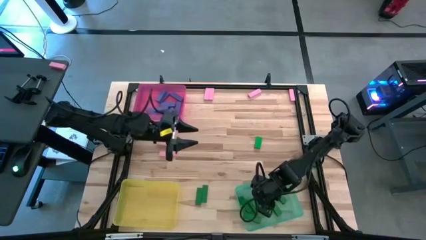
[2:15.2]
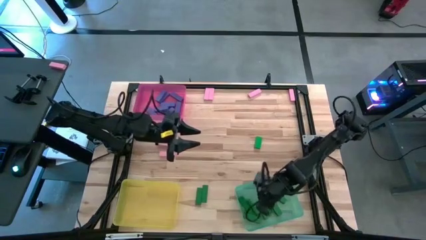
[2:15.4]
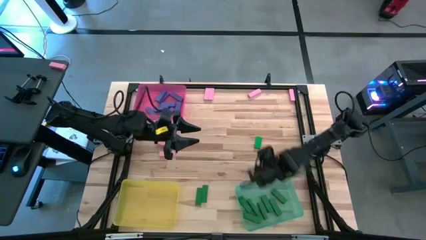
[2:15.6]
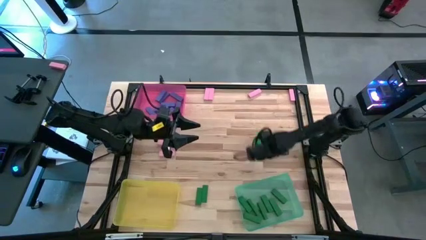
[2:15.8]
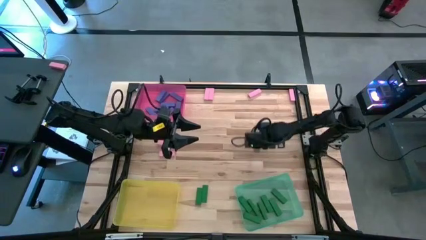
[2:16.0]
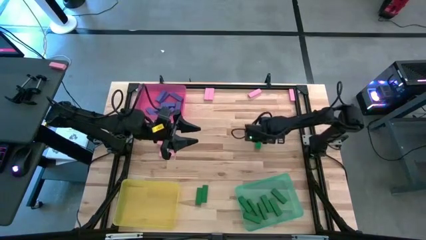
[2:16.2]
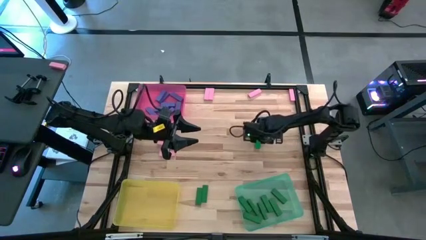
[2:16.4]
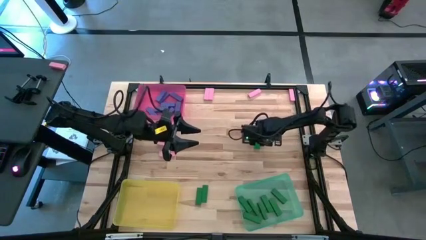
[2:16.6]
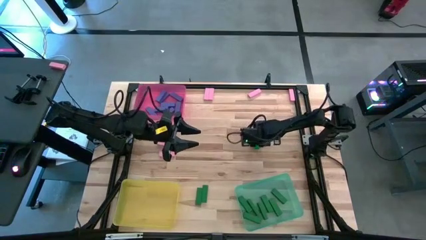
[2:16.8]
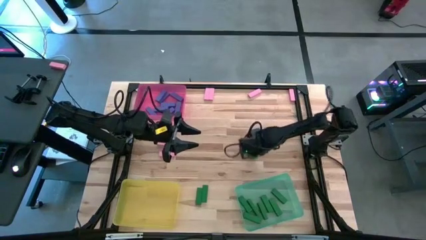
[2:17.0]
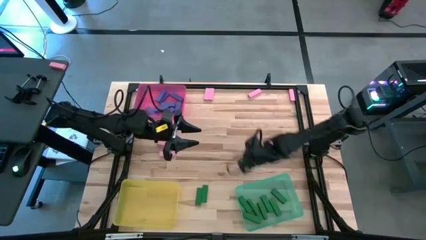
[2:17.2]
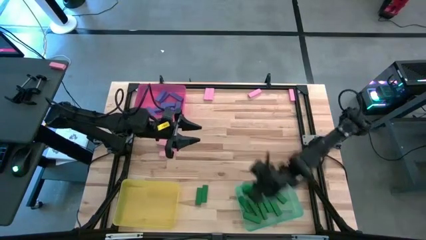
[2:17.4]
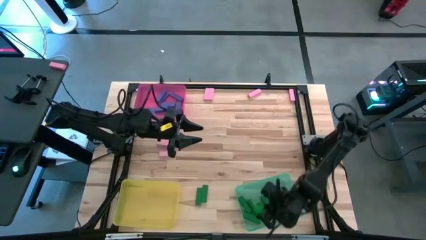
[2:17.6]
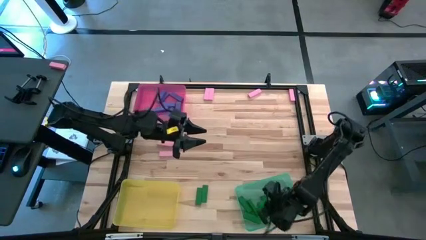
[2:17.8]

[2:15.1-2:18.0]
Task: Sort blocks
Put the green block into the light green bin

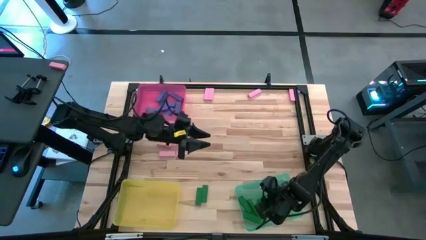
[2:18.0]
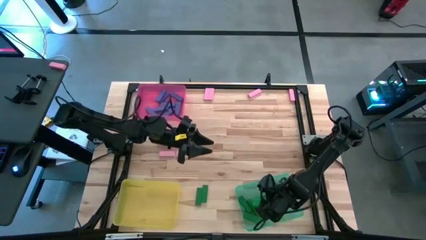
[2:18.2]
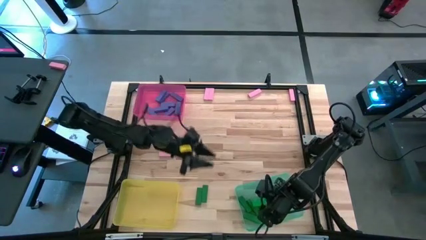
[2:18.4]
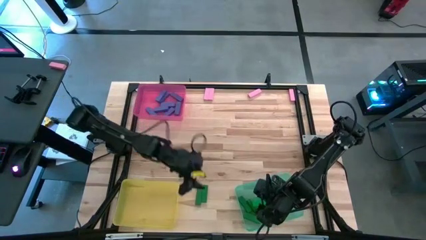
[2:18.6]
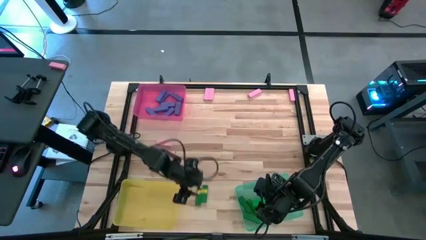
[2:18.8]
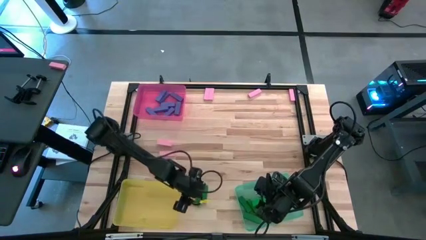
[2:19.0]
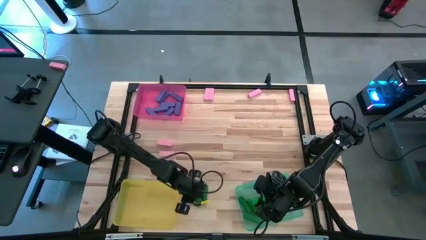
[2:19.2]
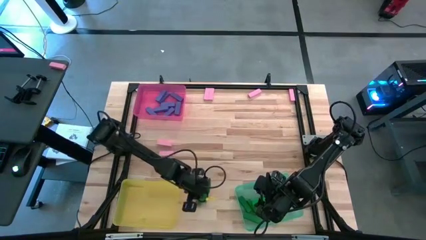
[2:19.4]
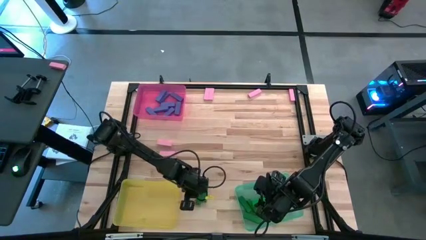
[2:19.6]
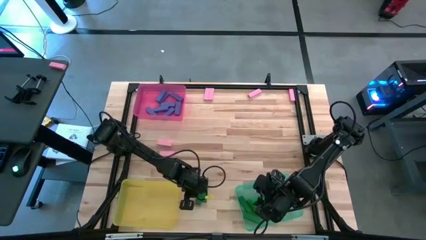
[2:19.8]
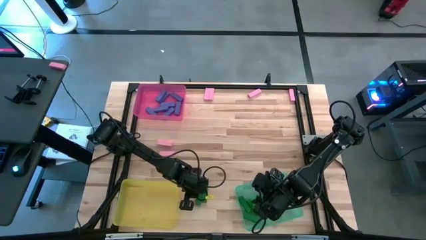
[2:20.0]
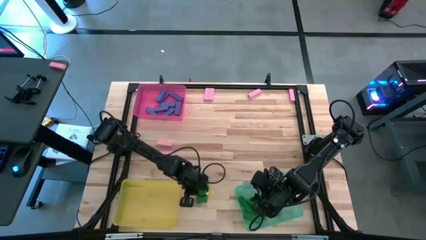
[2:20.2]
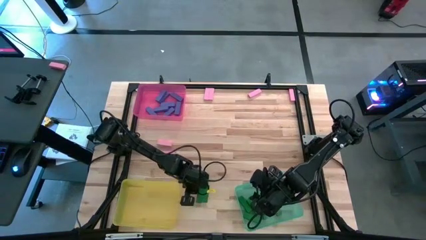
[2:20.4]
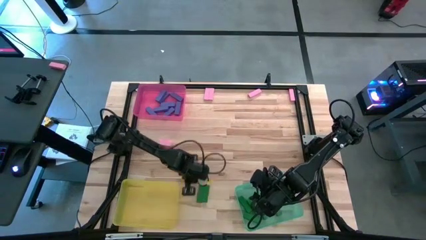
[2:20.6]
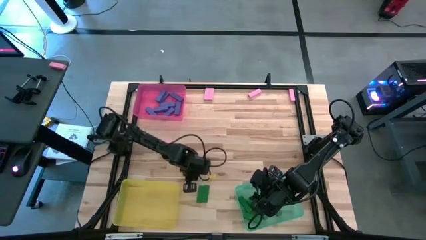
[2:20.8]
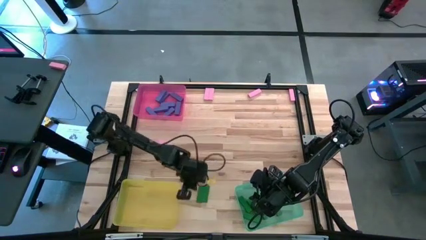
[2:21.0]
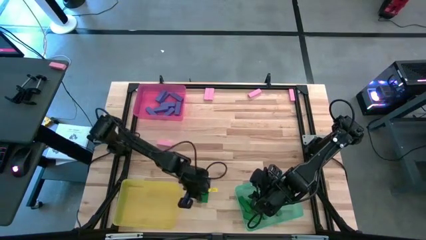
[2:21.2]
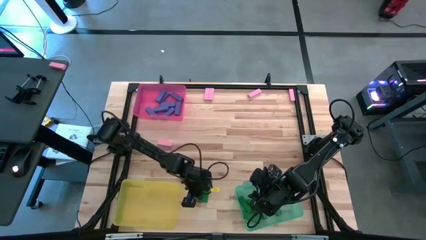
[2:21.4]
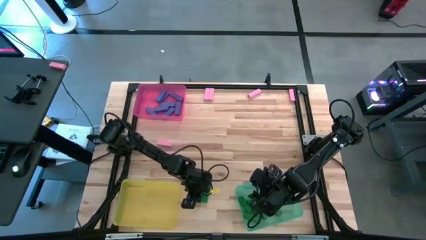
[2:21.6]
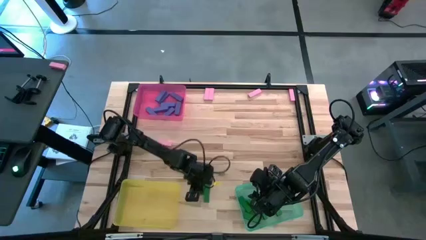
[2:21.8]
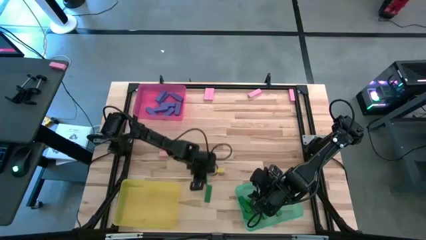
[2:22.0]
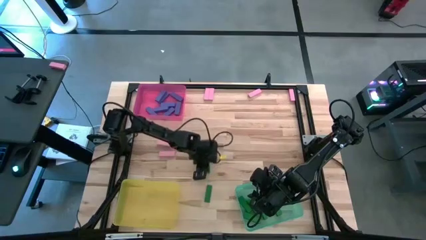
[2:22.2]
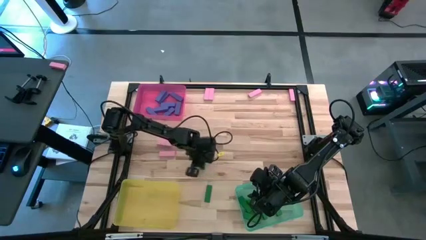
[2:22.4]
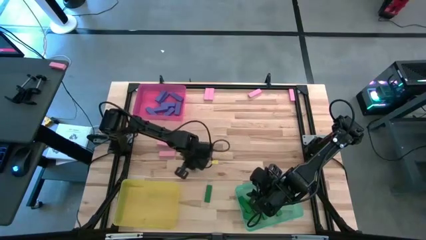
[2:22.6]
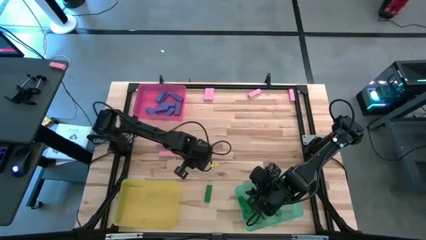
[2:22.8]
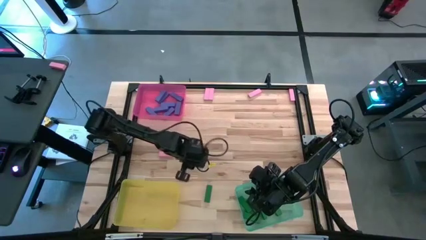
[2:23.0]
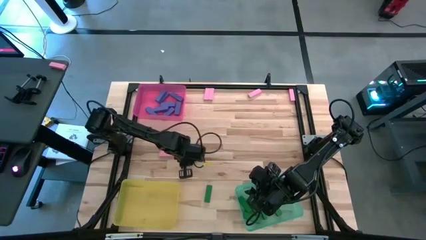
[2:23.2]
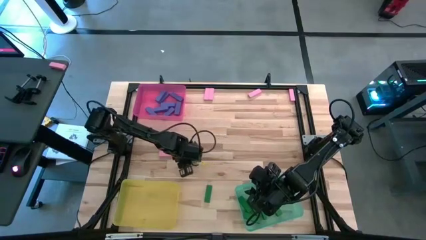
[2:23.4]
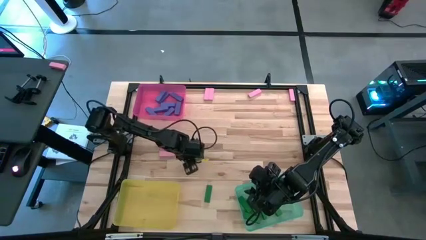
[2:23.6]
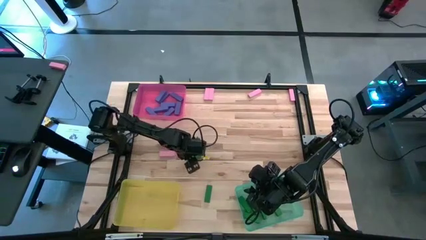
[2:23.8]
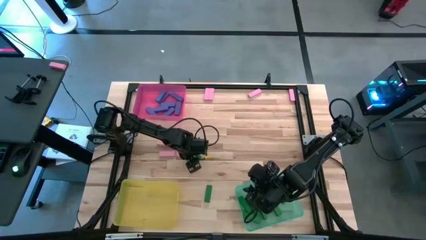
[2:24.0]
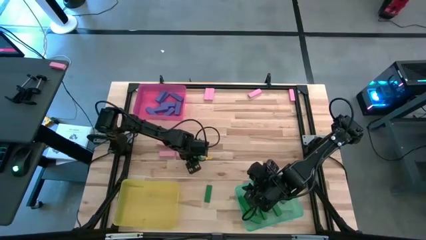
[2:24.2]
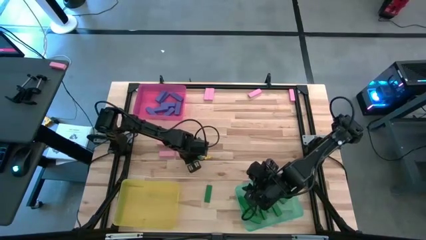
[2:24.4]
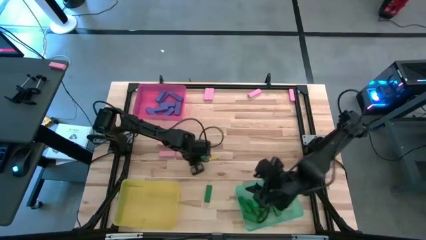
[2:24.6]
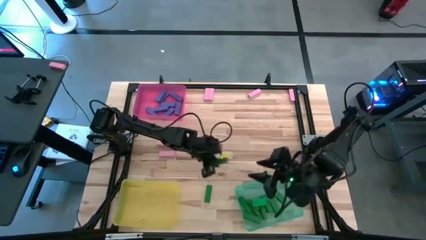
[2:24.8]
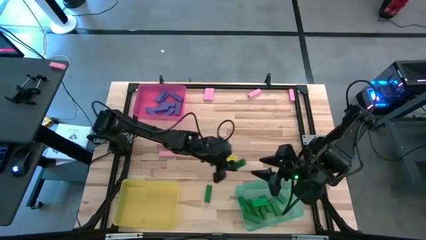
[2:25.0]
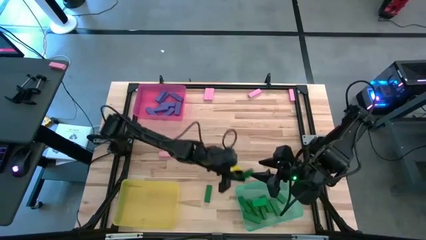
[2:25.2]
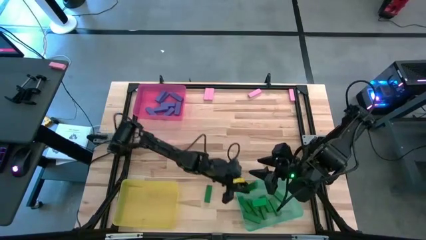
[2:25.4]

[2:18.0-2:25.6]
Put the green block into the light green bin

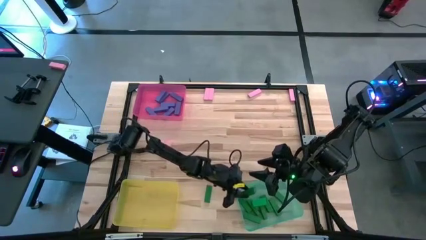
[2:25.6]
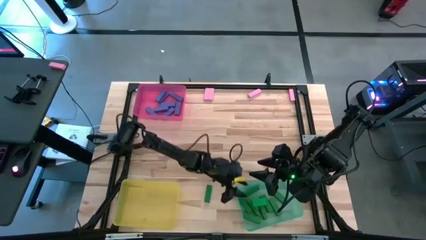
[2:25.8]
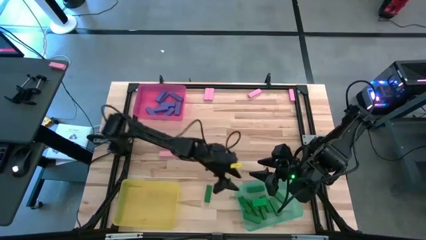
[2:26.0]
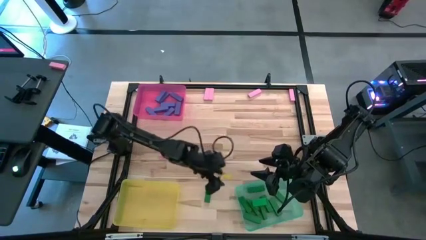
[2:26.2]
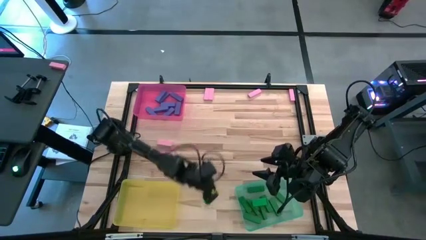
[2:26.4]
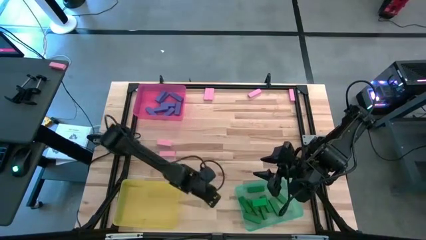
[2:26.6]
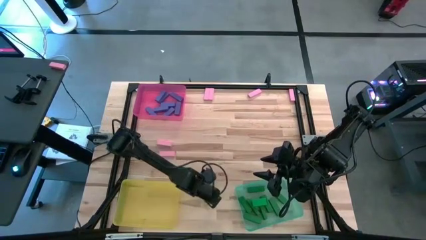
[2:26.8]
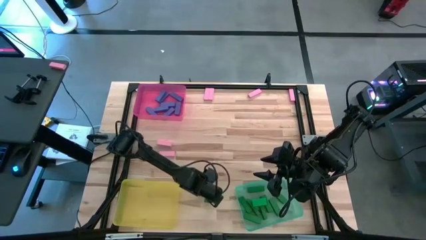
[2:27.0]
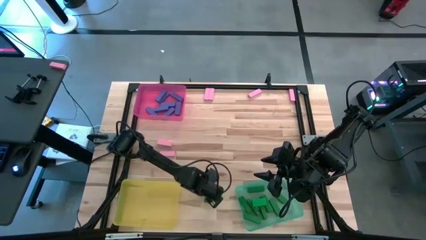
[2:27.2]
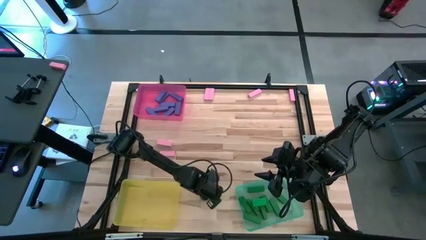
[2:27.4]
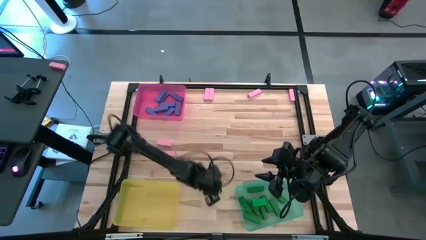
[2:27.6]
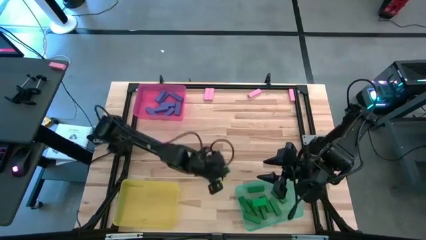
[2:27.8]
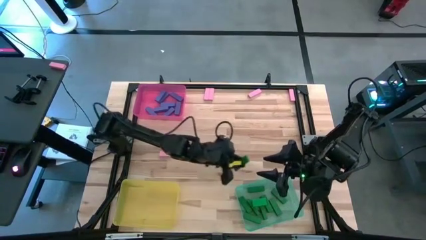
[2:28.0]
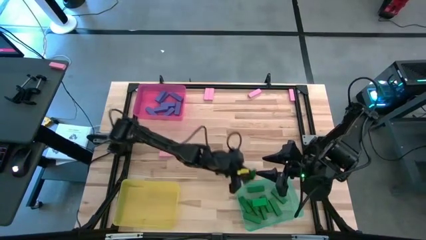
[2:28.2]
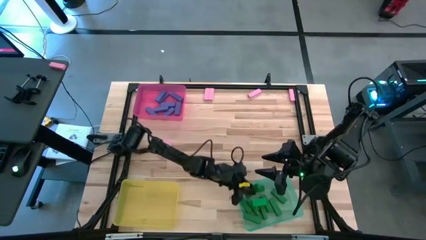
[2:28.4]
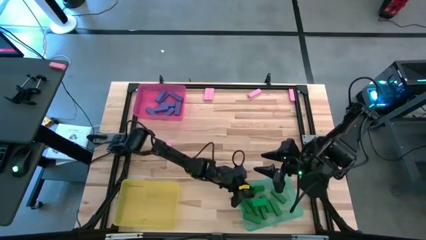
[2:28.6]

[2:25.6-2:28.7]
Put the green block into the light green bin
